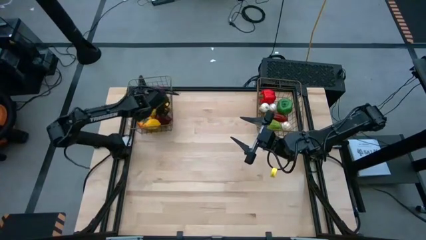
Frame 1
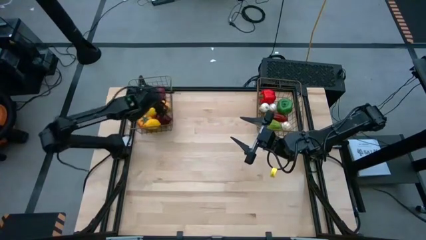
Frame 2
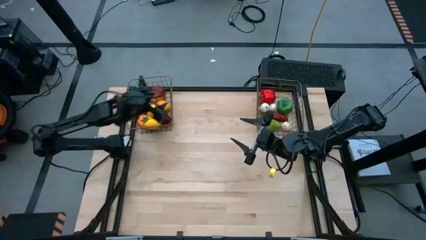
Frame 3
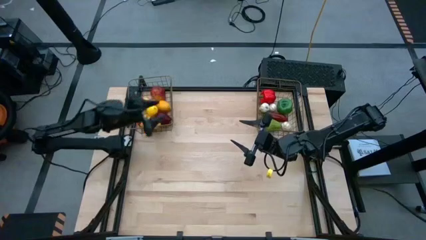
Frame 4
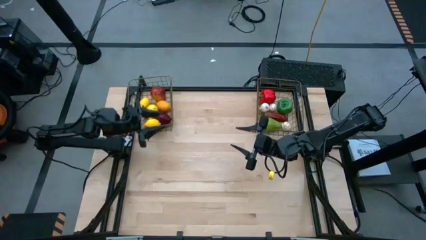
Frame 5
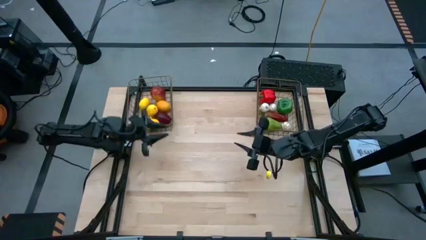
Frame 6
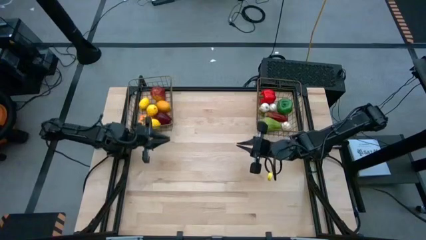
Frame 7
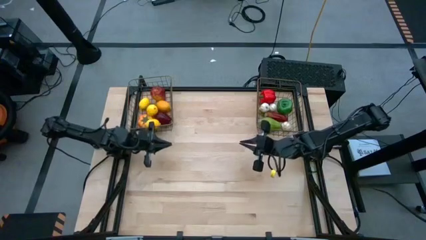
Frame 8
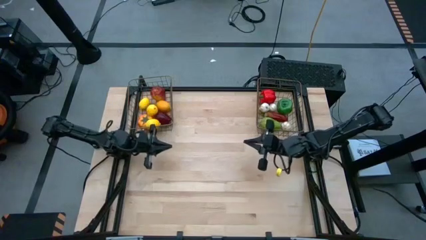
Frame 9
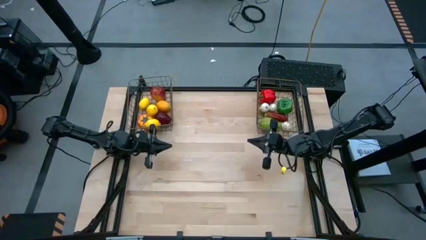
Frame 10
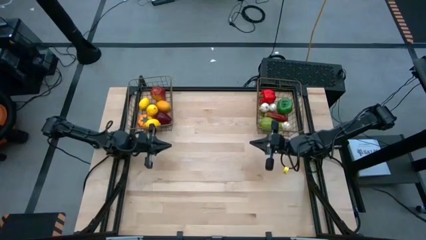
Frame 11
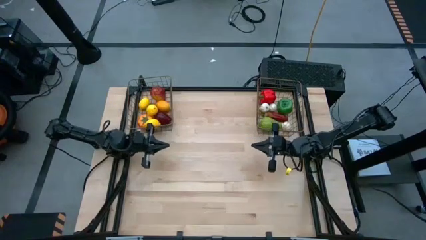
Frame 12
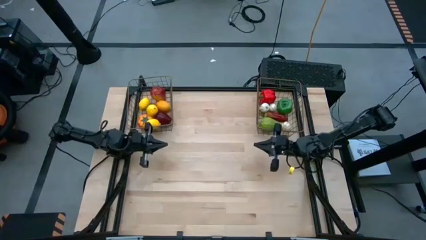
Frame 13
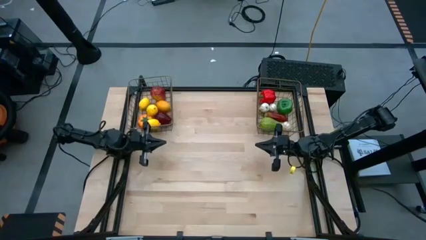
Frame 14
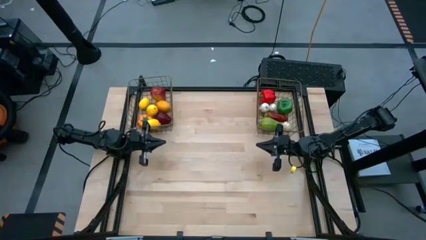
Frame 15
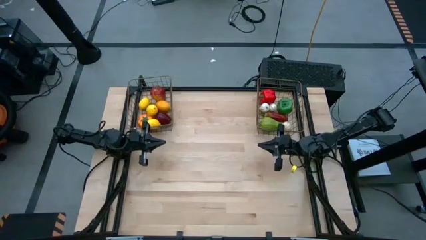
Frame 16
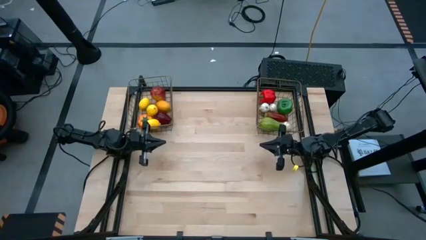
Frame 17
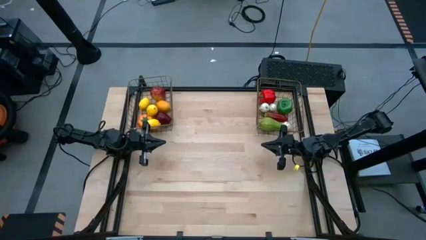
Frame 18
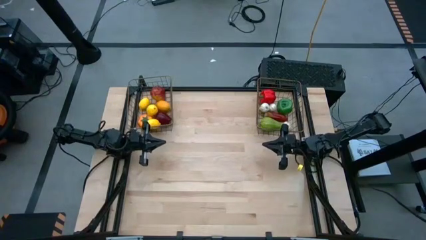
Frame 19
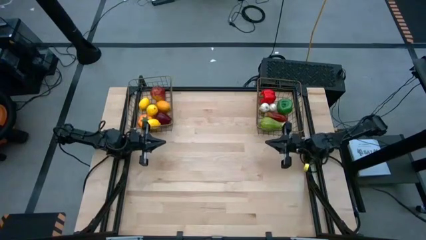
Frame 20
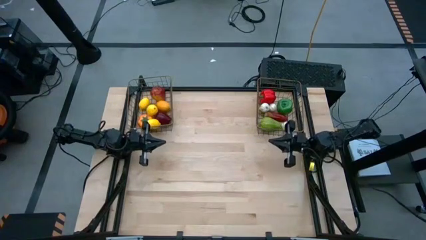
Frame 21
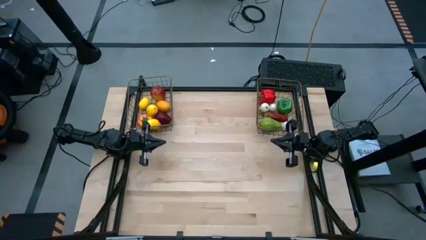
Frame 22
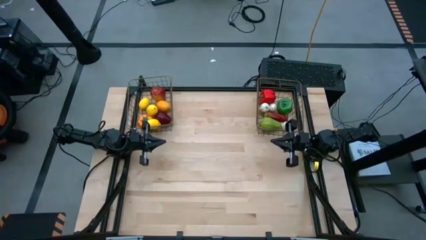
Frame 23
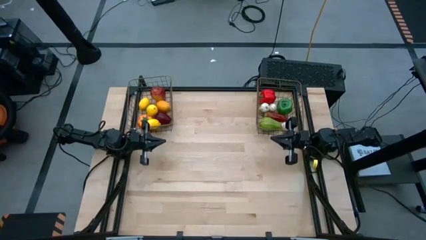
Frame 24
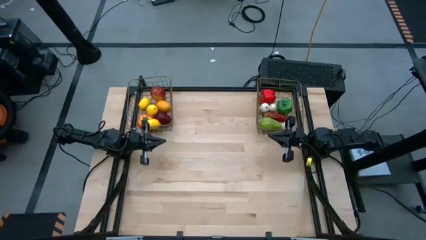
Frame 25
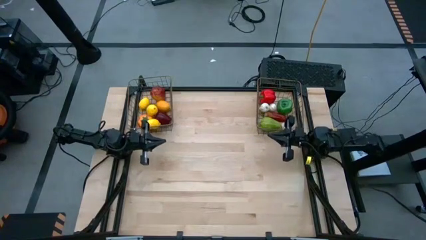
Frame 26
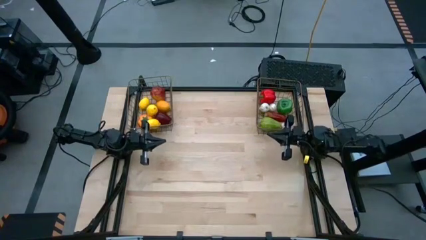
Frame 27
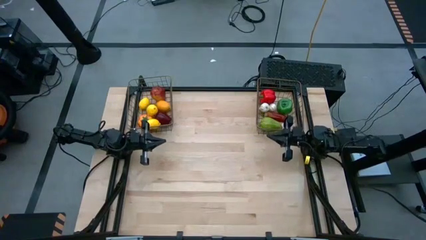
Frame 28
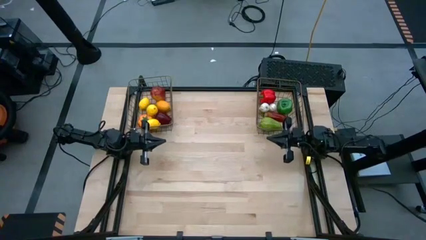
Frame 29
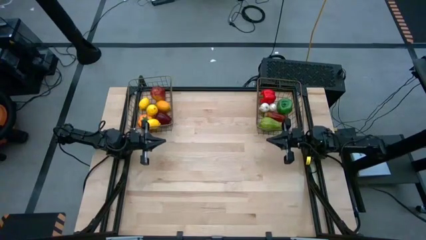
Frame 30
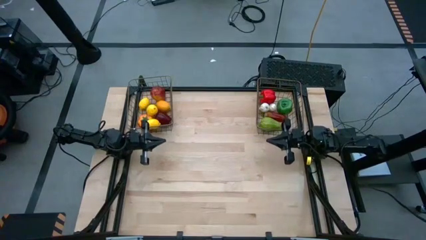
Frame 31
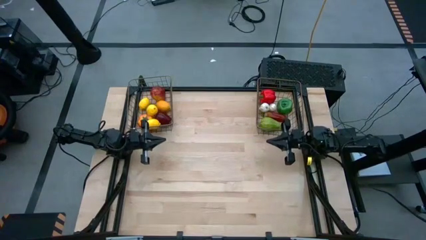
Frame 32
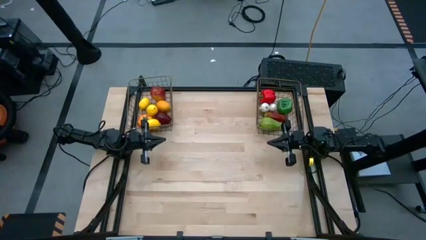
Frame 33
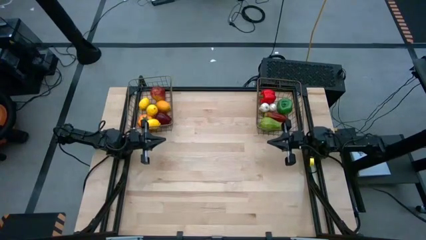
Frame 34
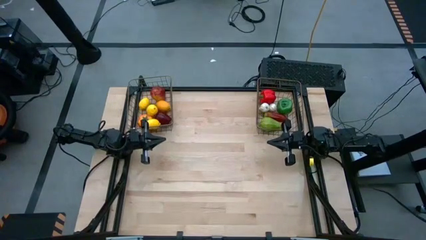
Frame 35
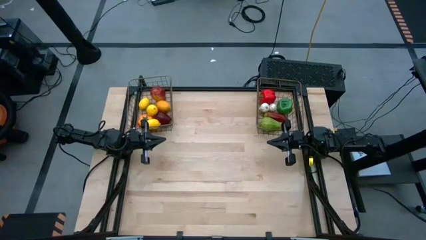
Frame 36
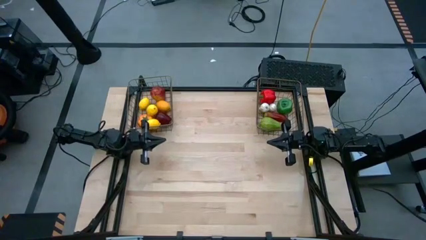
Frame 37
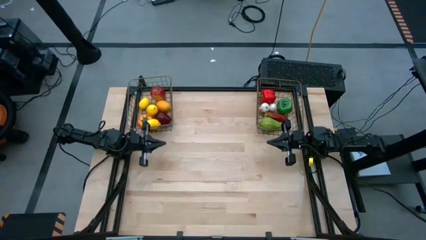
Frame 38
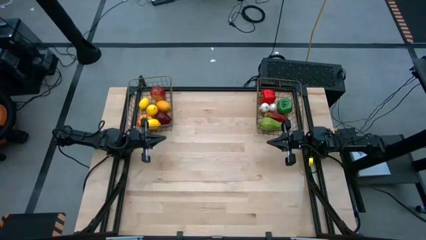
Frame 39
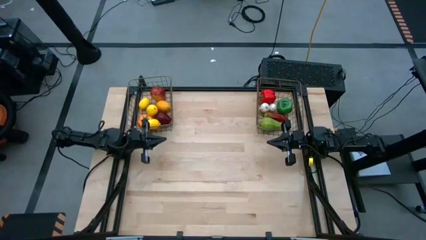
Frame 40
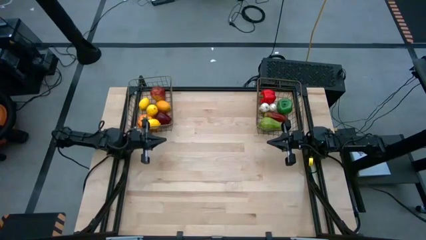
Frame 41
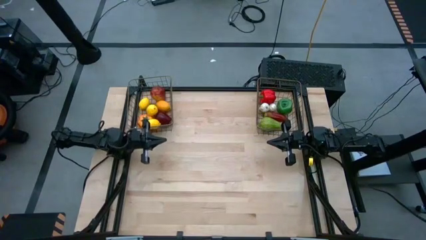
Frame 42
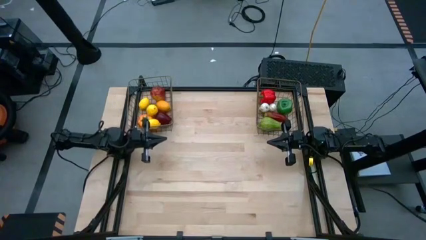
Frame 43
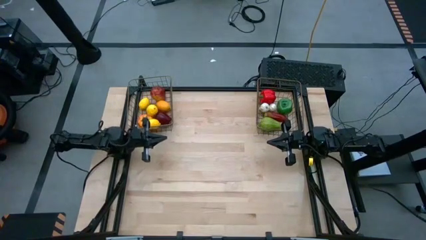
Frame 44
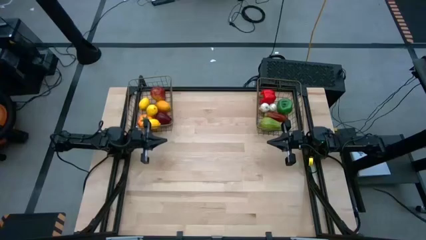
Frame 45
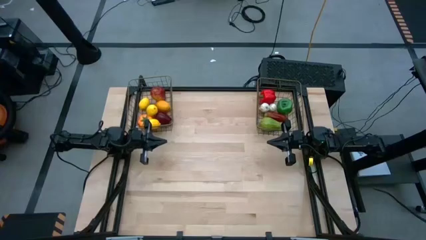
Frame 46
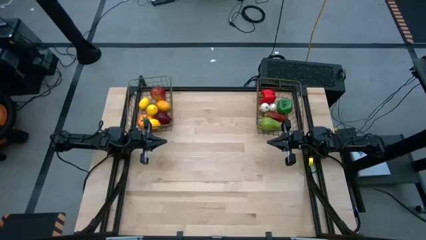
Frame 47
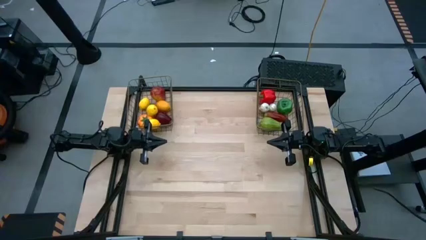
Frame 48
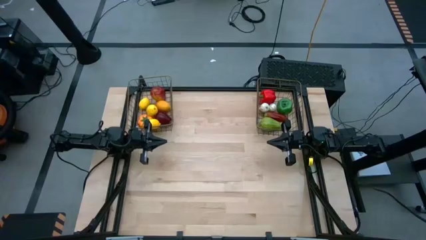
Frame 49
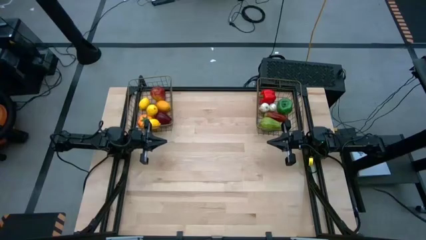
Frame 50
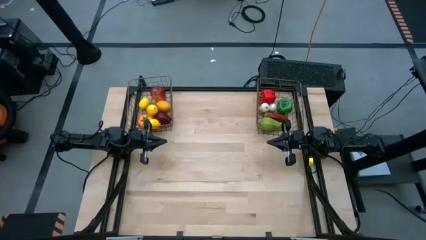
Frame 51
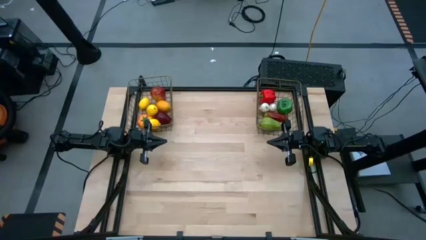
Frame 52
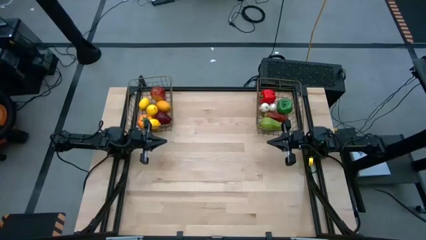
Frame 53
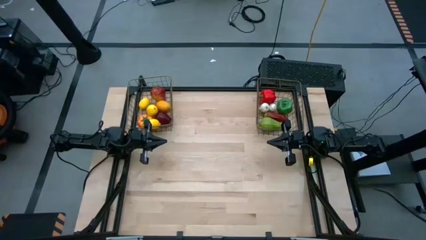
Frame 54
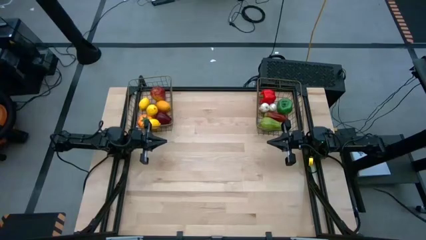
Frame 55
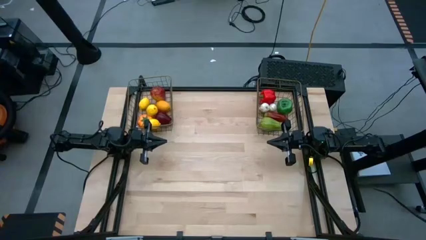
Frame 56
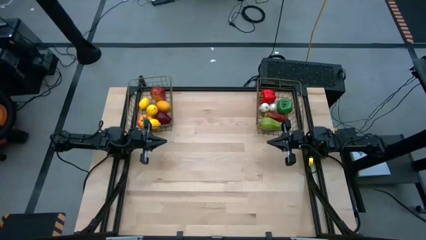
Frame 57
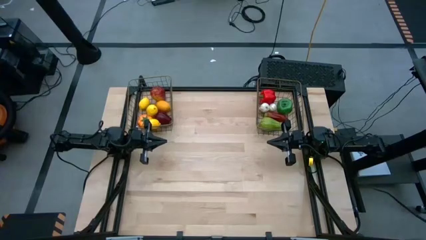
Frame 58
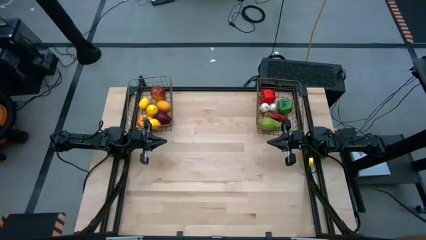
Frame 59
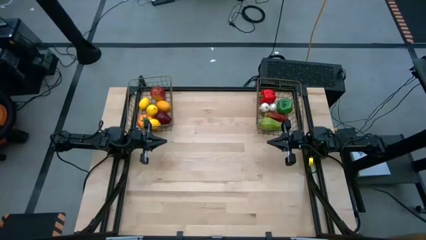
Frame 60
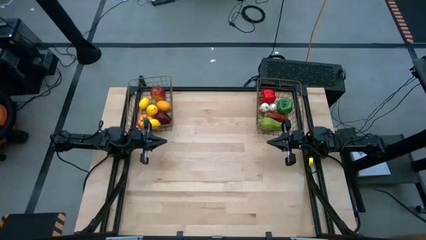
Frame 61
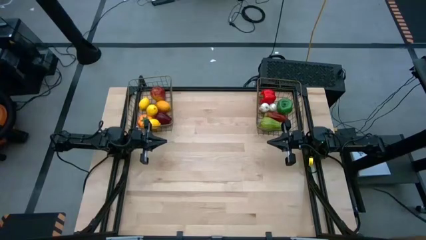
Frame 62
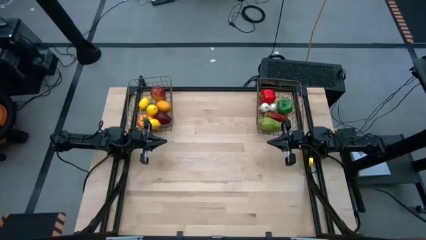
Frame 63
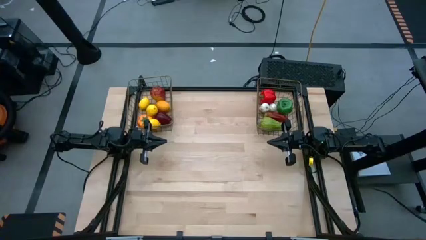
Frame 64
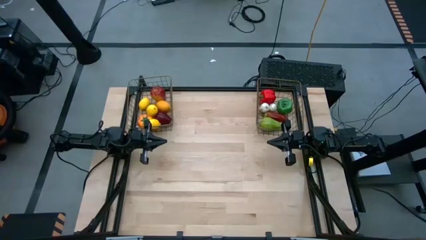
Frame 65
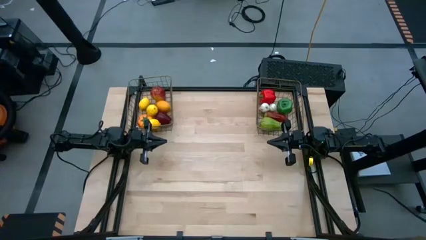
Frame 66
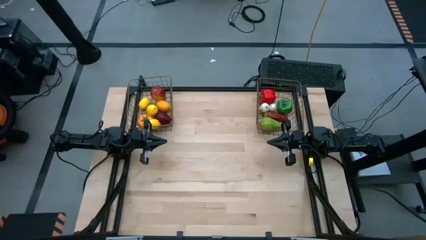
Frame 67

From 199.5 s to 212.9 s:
Task: Sort produce into baskets
Return to Home Position
